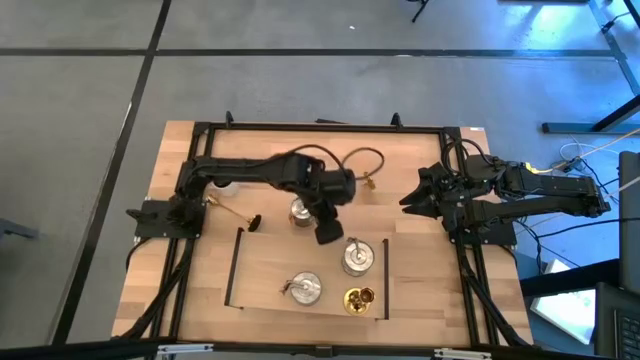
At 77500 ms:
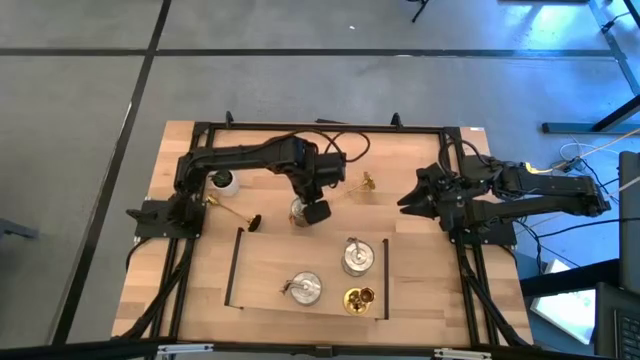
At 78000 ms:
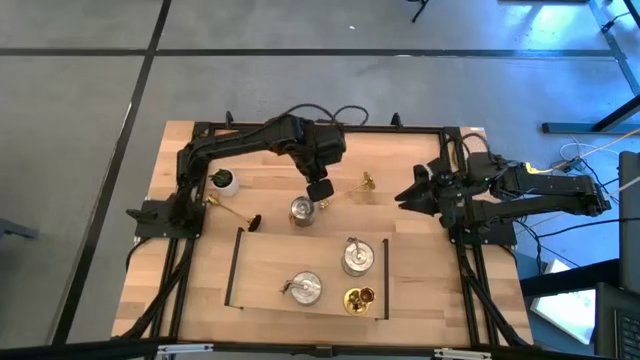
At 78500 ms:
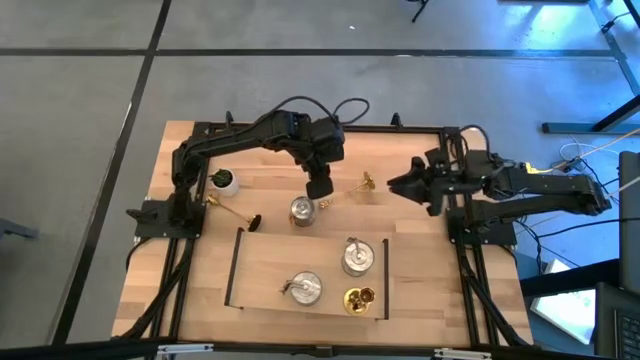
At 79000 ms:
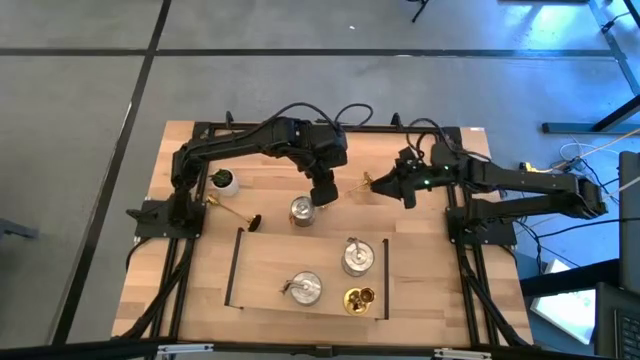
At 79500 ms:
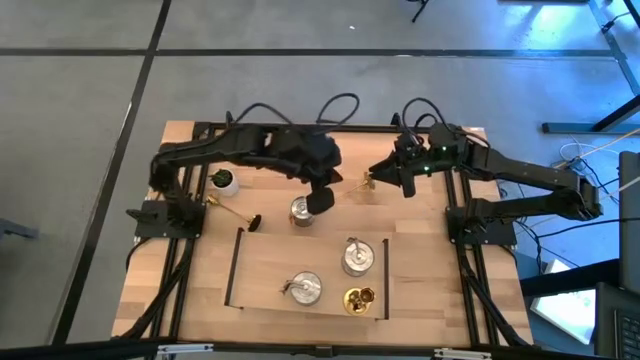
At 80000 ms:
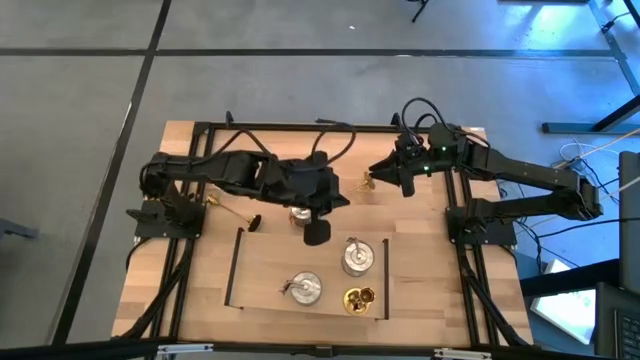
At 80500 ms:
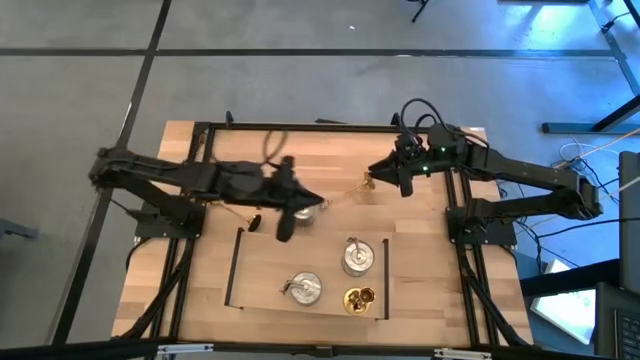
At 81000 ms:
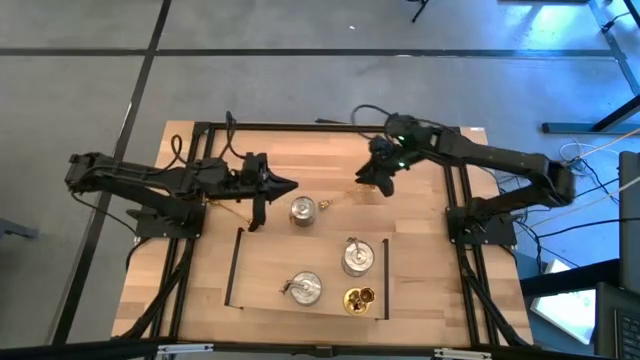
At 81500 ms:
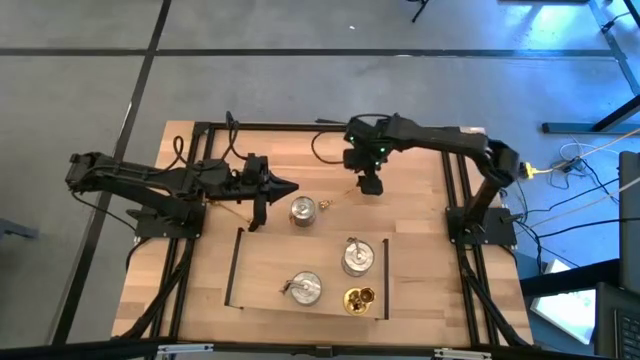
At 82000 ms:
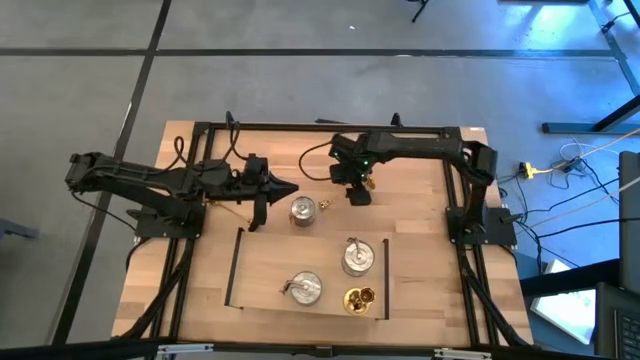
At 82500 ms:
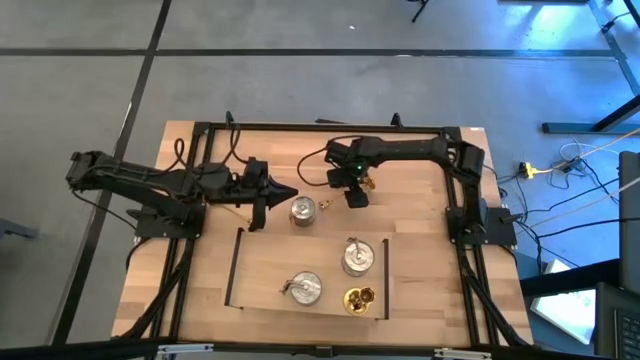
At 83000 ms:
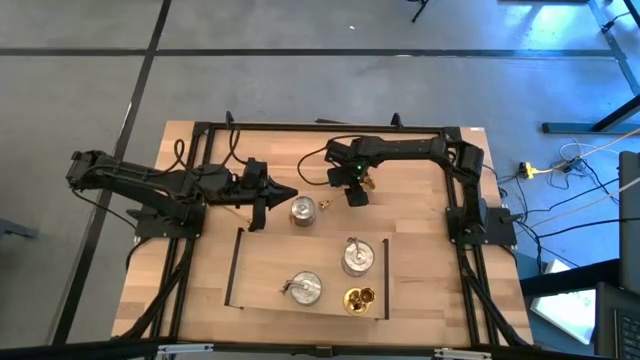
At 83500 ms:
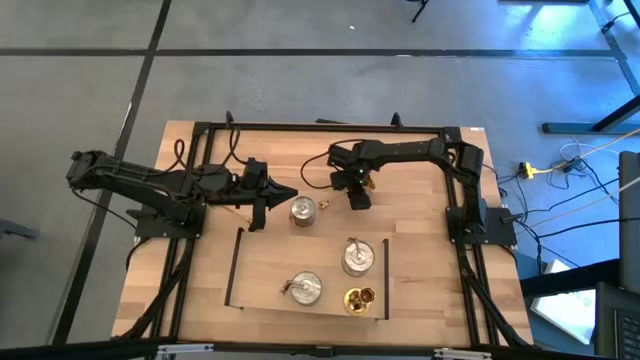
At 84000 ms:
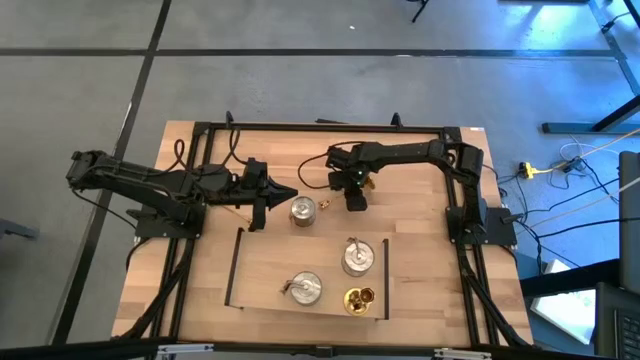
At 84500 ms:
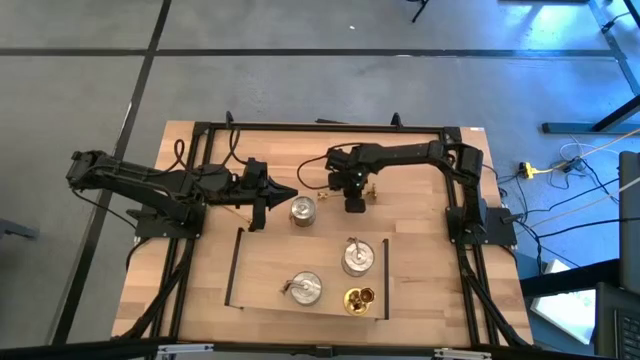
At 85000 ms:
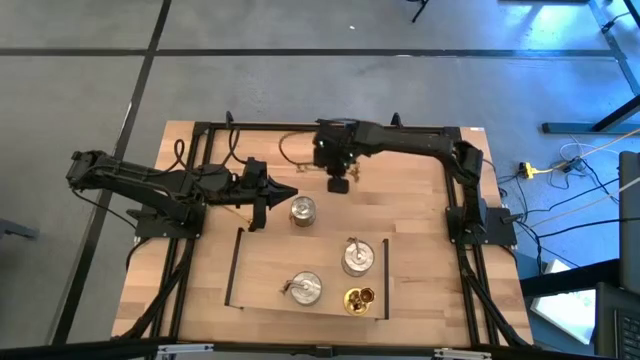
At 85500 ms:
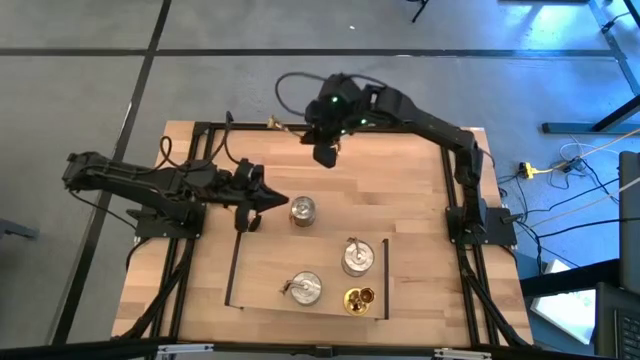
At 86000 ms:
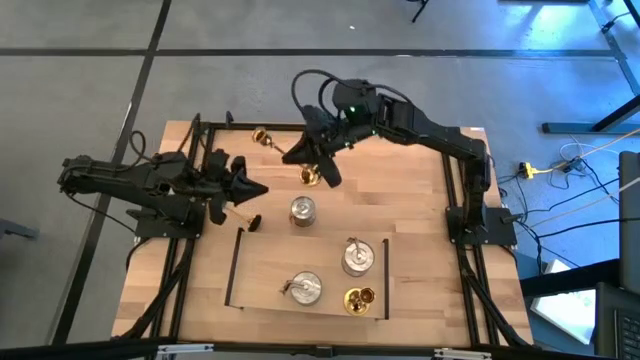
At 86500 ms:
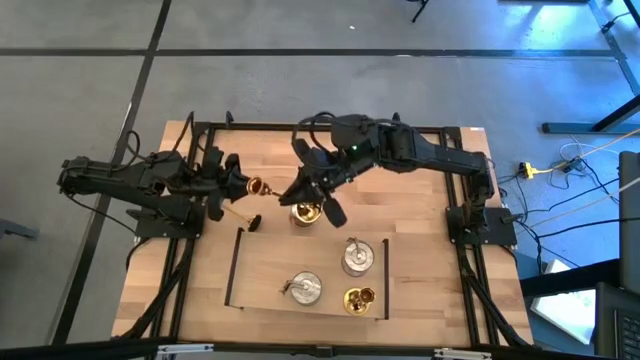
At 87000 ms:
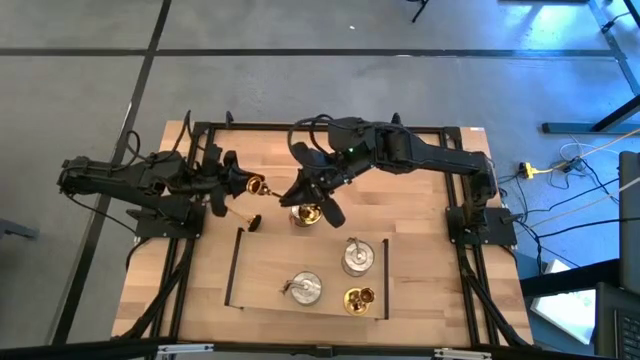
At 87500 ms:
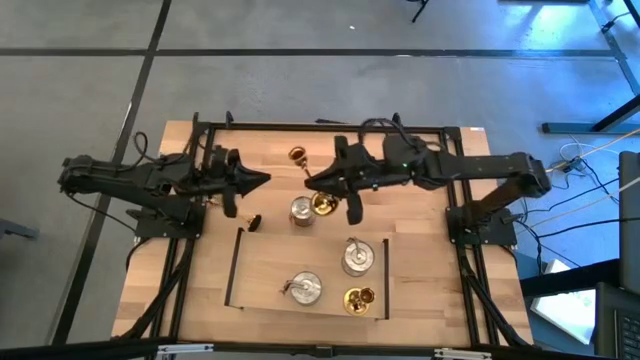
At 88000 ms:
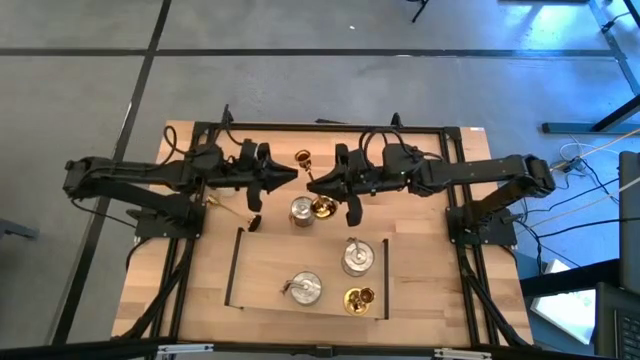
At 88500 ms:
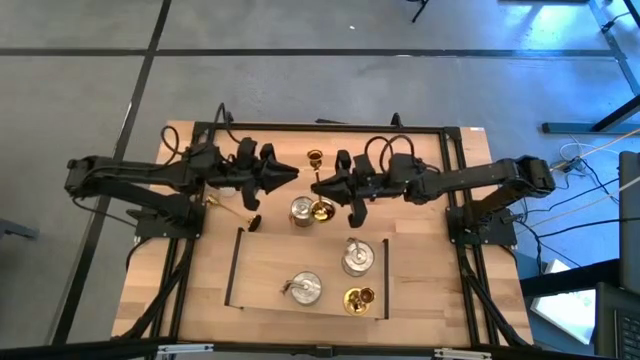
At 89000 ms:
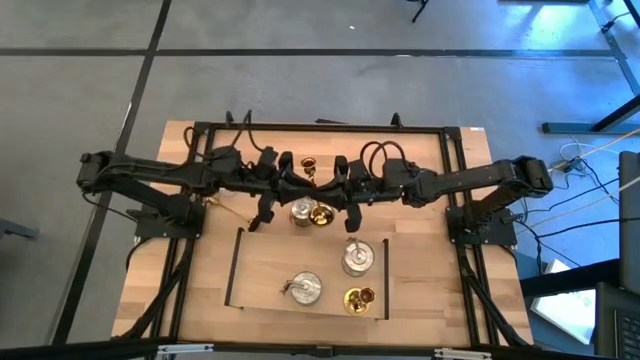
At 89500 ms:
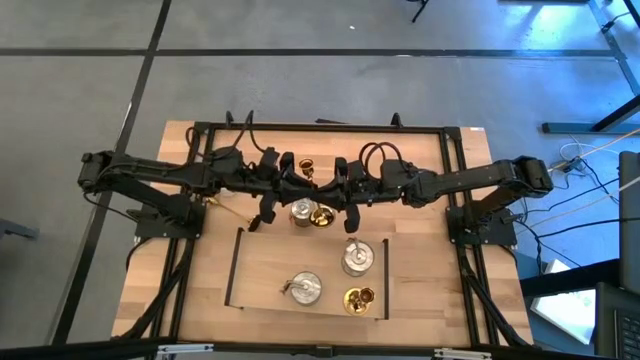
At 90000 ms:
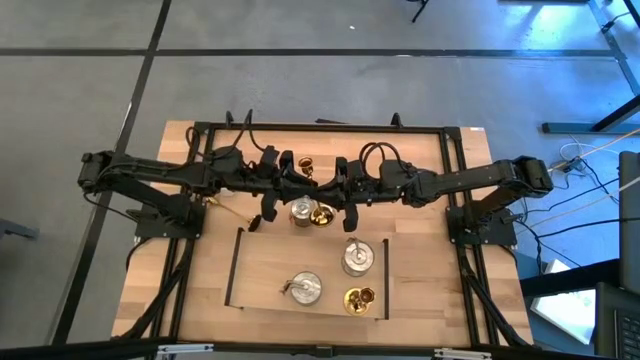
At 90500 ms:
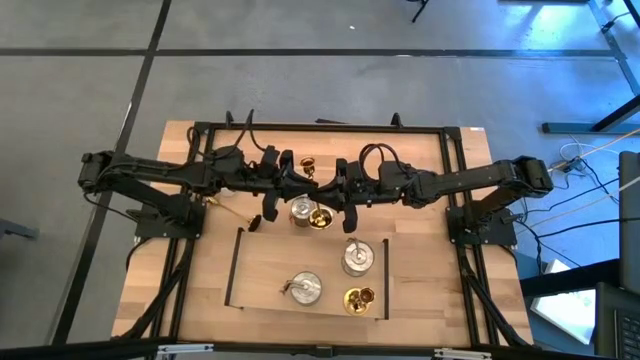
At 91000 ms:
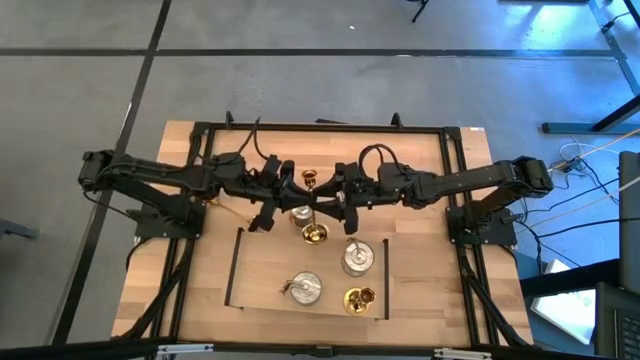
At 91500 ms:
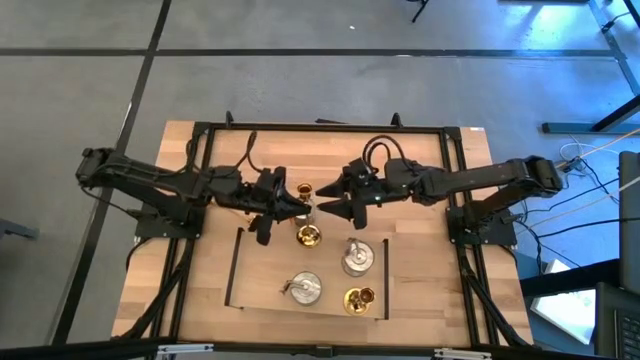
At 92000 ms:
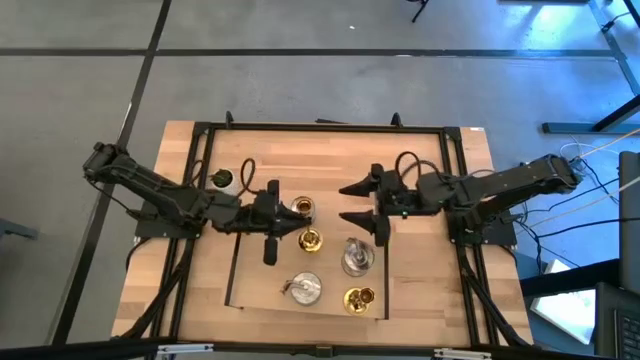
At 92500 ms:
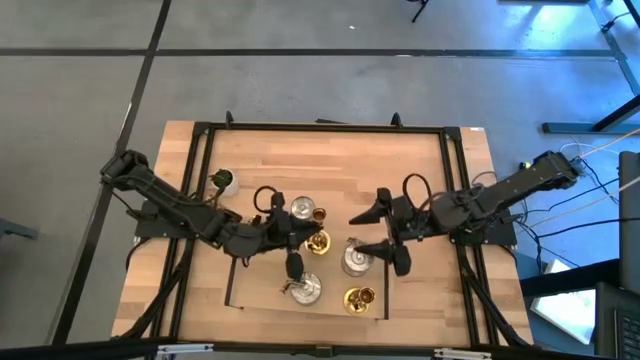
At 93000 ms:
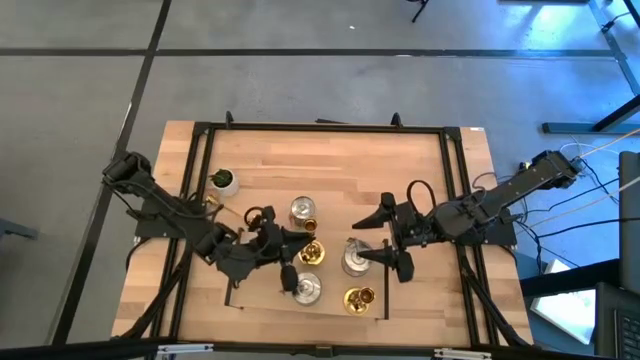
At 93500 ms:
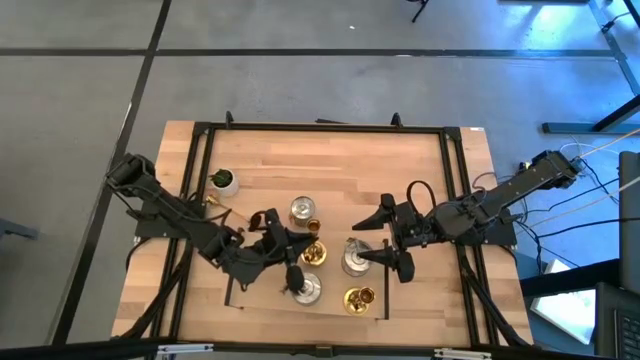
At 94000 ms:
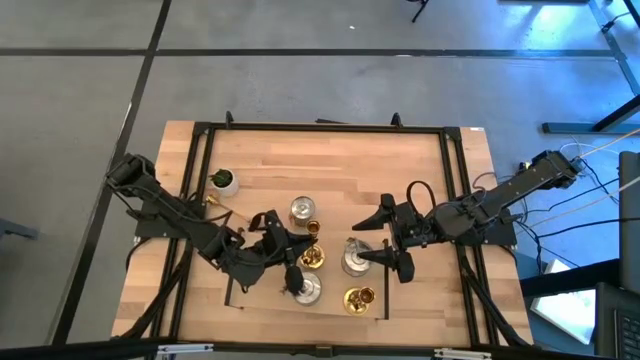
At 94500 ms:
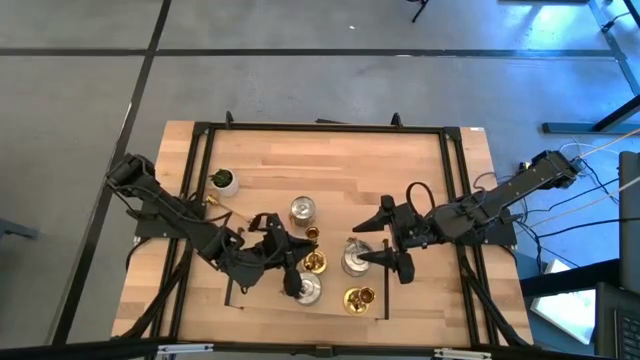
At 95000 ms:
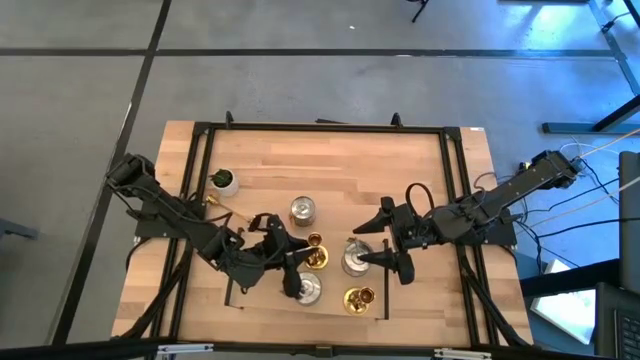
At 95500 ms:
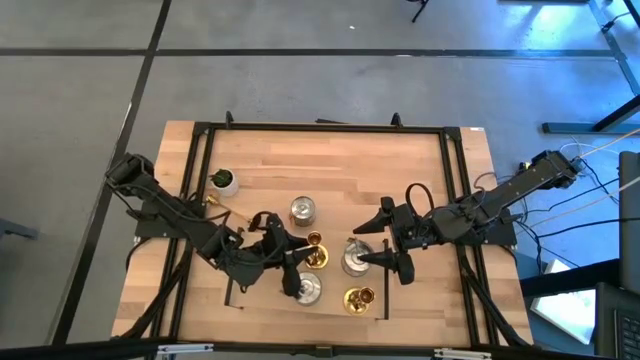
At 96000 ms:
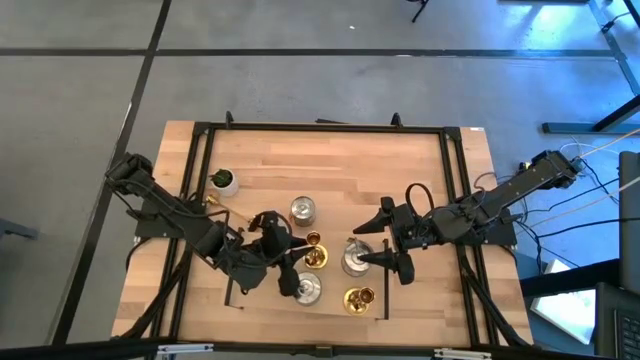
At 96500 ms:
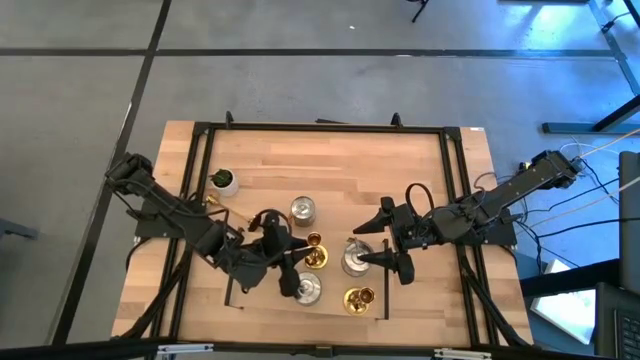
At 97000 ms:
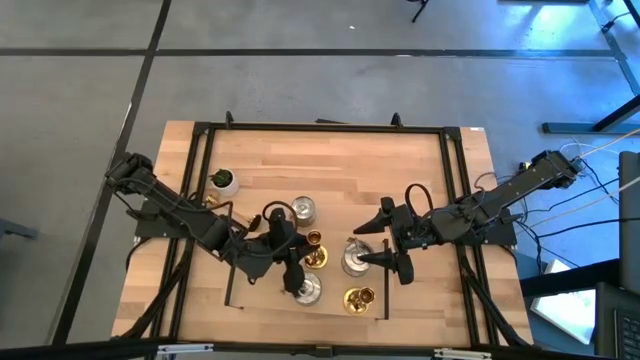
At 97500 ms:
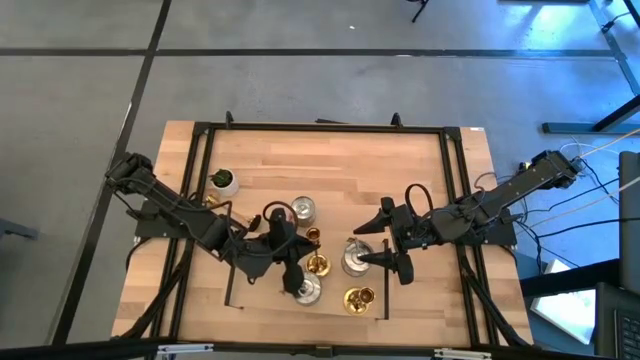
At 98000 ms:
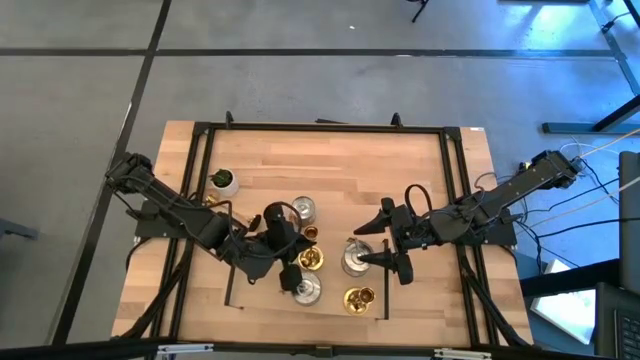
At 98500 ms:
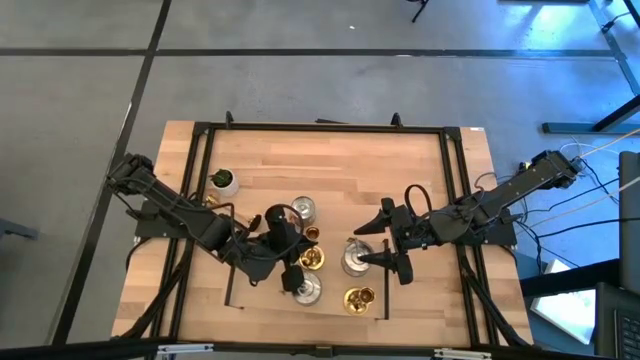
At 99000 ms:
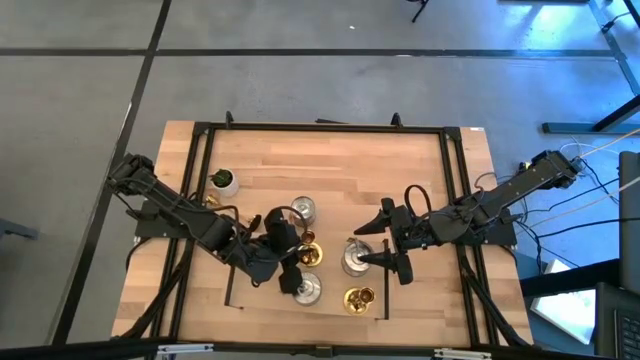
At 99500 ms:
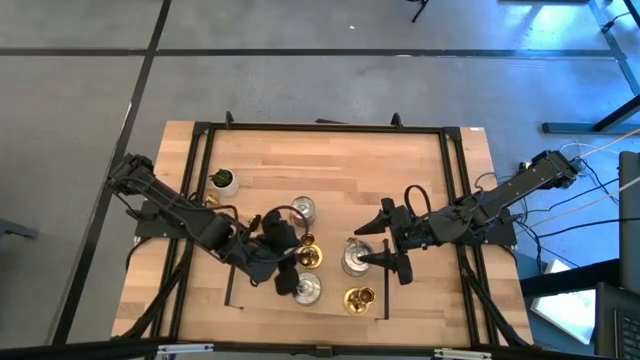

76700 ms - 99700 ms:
Task: Pick & Place candle stick holders
Put the right gold candle holder on the shelf
